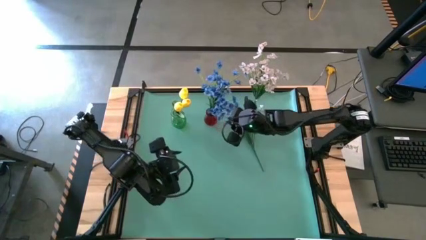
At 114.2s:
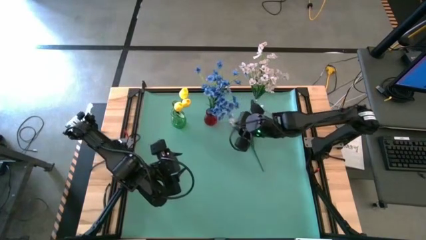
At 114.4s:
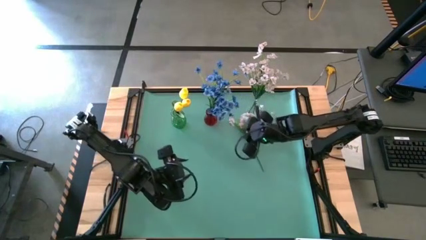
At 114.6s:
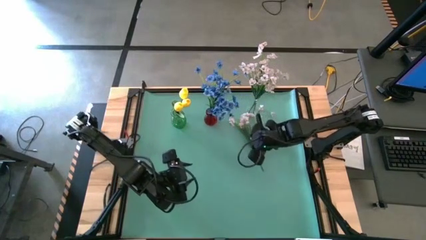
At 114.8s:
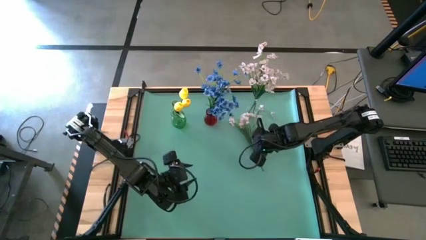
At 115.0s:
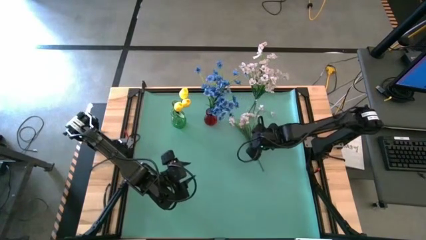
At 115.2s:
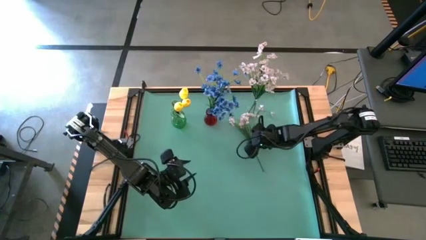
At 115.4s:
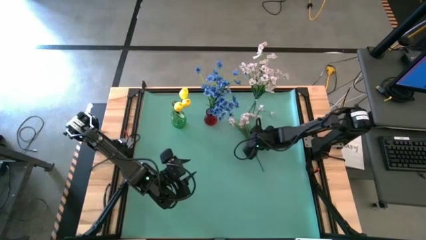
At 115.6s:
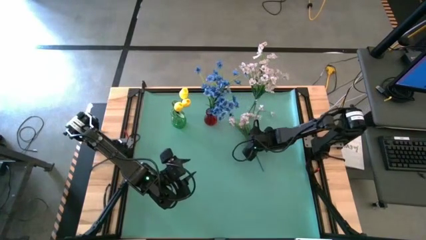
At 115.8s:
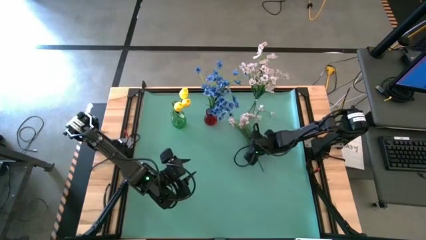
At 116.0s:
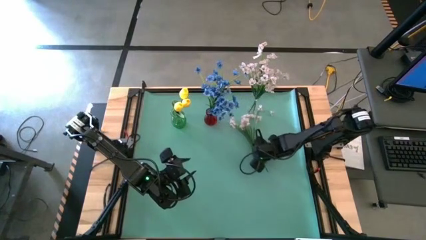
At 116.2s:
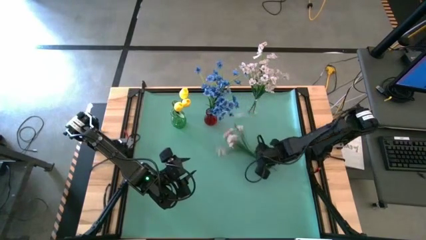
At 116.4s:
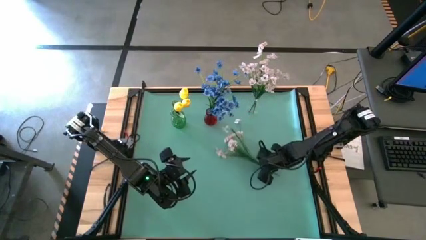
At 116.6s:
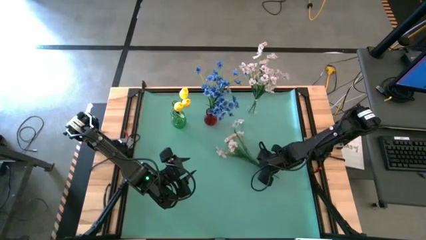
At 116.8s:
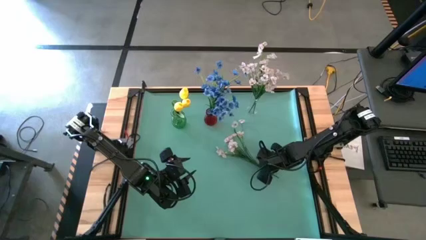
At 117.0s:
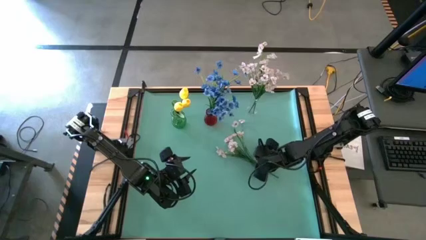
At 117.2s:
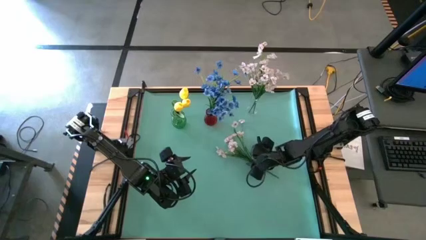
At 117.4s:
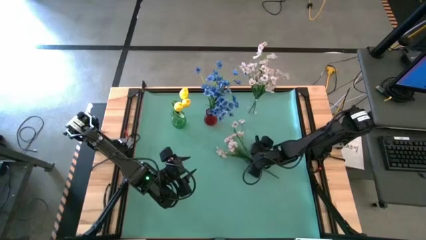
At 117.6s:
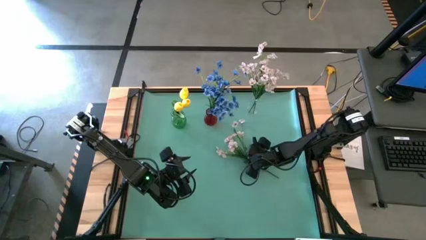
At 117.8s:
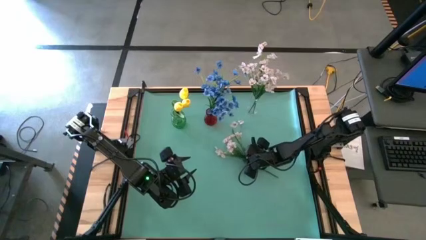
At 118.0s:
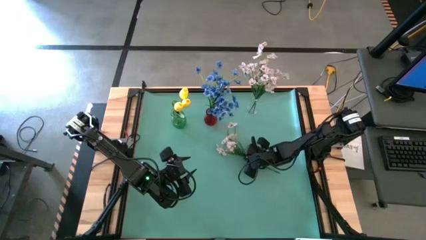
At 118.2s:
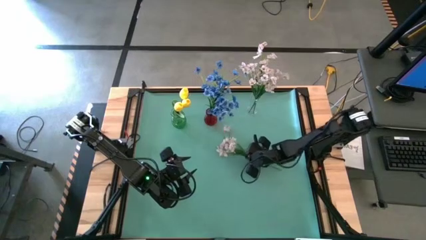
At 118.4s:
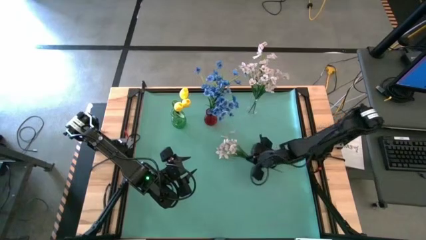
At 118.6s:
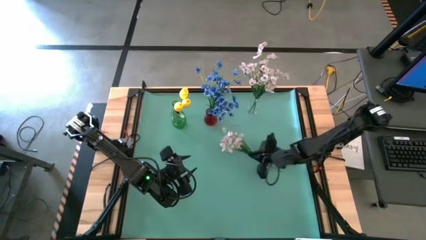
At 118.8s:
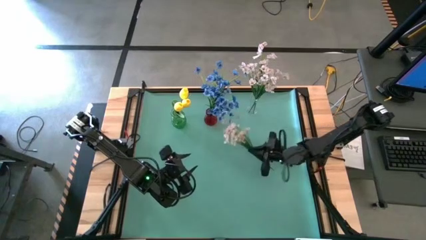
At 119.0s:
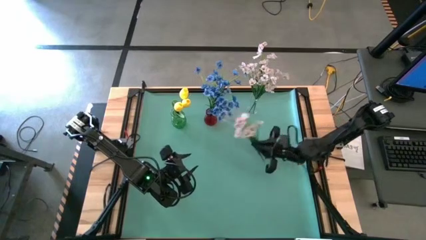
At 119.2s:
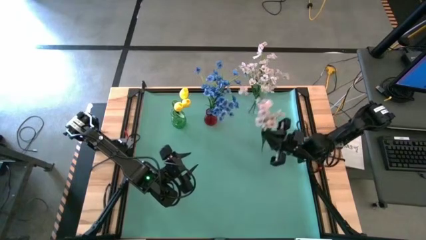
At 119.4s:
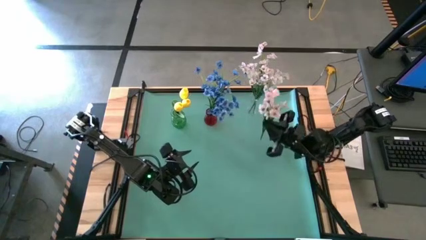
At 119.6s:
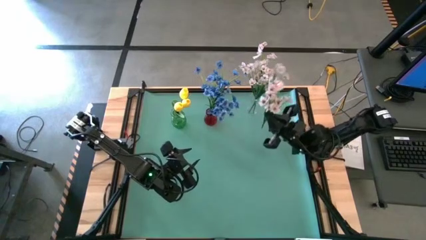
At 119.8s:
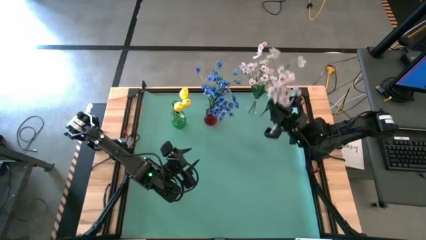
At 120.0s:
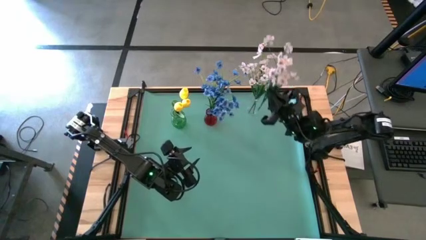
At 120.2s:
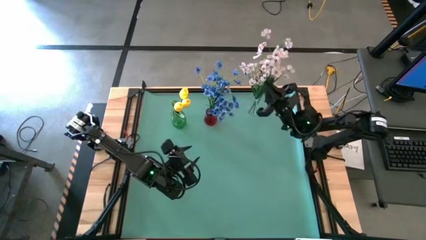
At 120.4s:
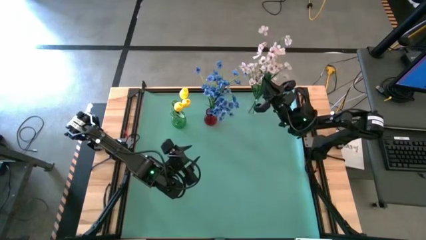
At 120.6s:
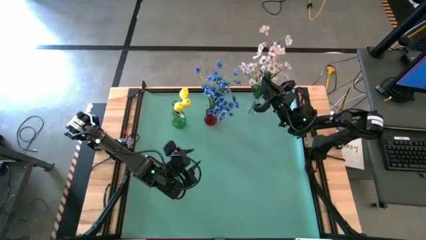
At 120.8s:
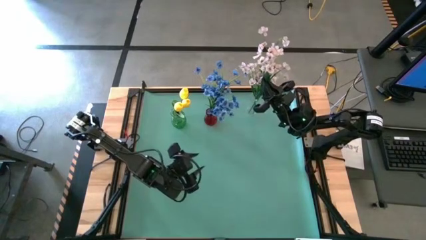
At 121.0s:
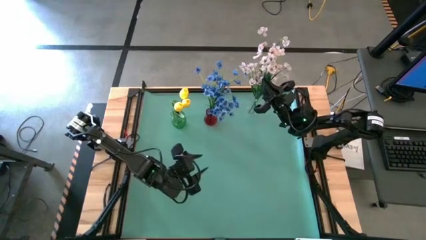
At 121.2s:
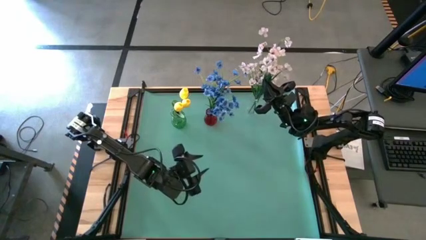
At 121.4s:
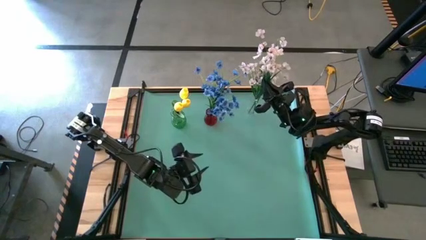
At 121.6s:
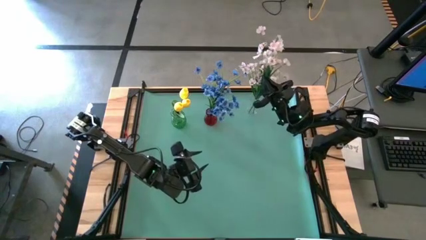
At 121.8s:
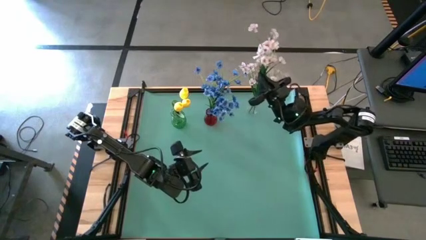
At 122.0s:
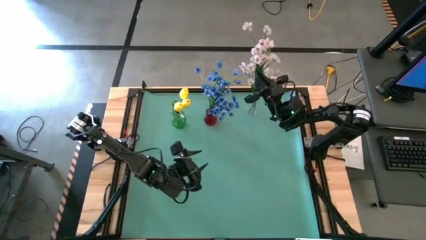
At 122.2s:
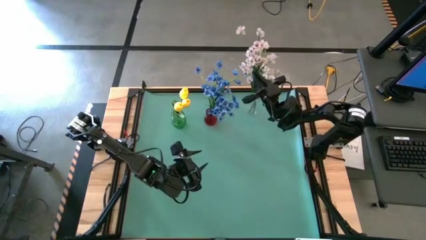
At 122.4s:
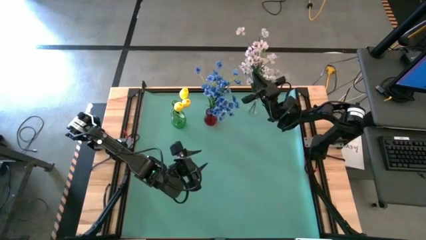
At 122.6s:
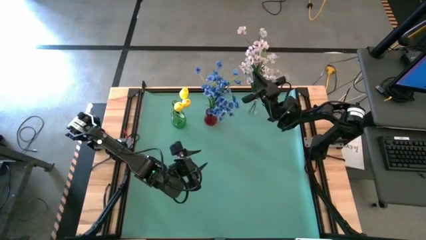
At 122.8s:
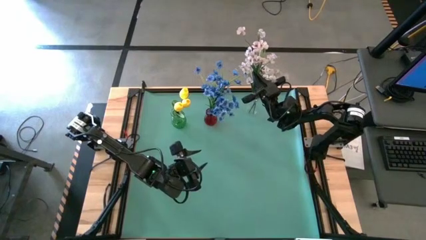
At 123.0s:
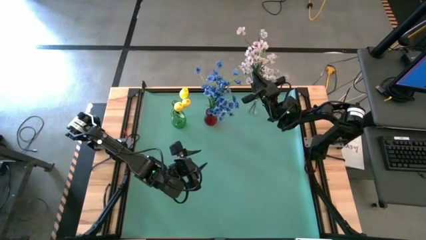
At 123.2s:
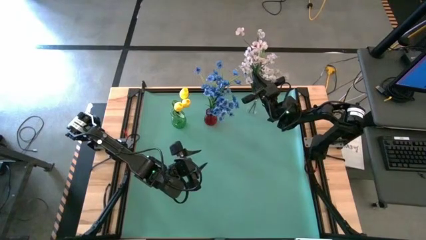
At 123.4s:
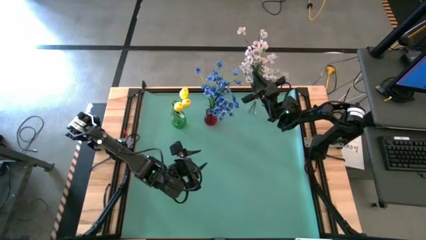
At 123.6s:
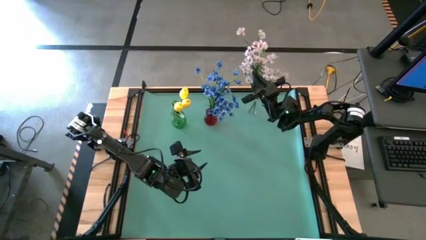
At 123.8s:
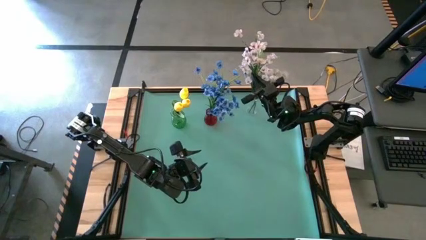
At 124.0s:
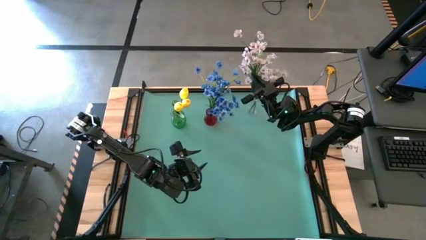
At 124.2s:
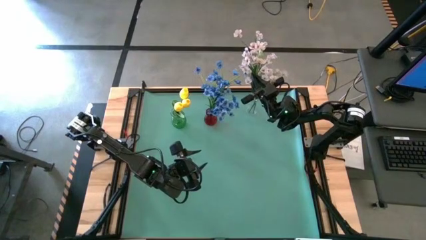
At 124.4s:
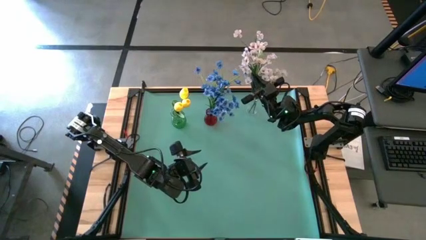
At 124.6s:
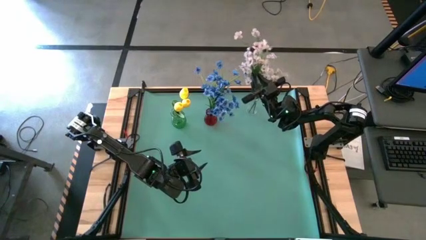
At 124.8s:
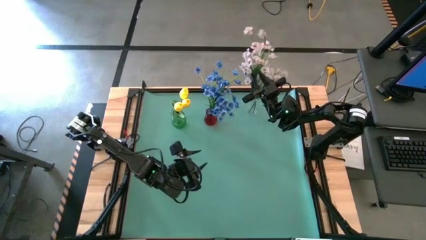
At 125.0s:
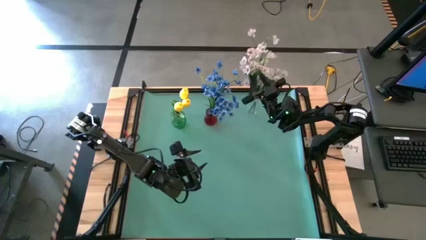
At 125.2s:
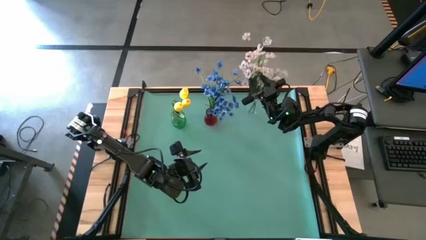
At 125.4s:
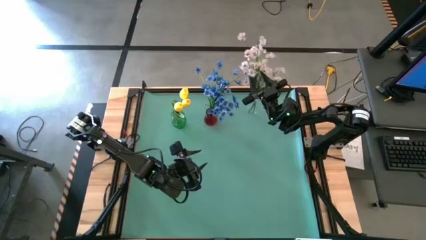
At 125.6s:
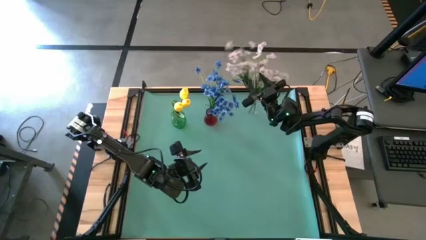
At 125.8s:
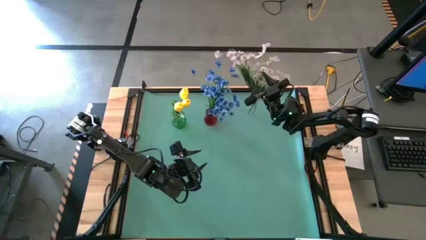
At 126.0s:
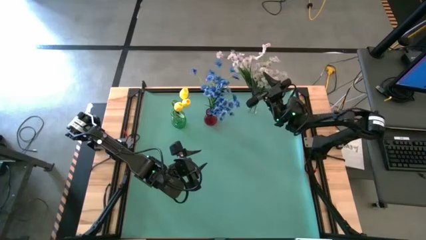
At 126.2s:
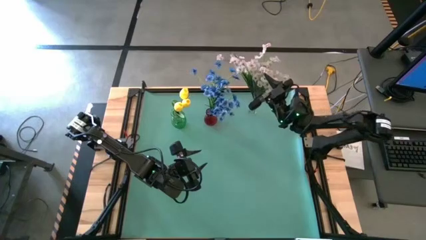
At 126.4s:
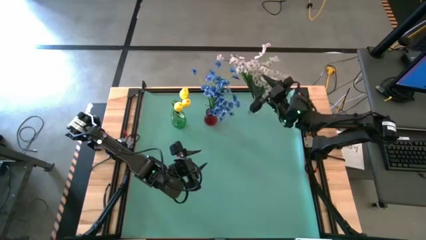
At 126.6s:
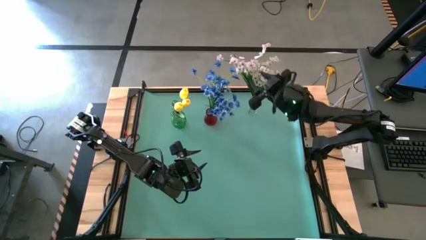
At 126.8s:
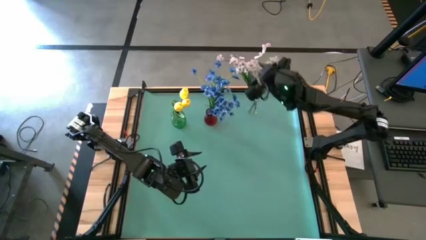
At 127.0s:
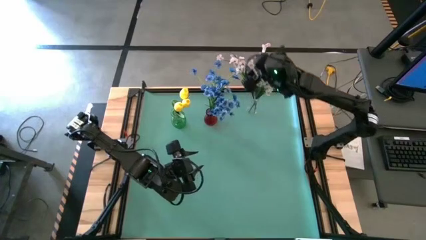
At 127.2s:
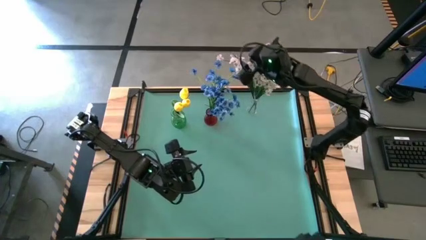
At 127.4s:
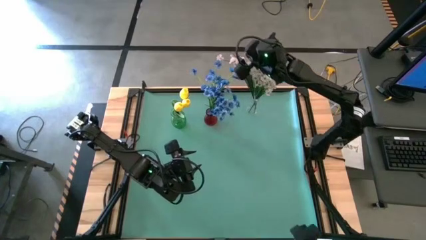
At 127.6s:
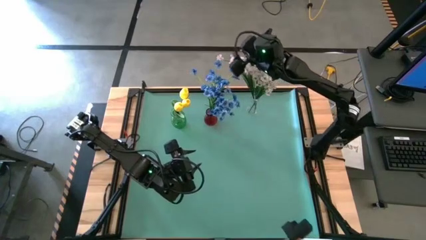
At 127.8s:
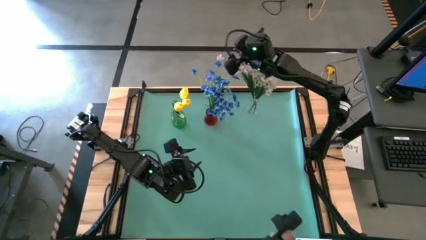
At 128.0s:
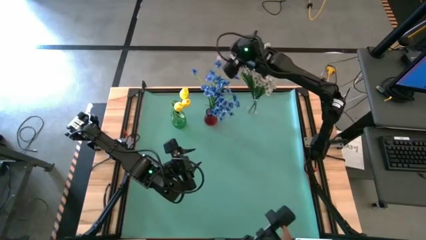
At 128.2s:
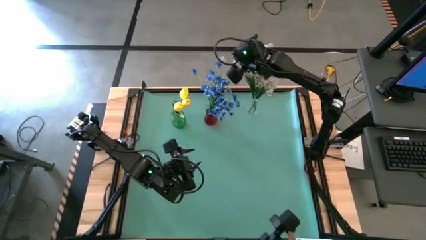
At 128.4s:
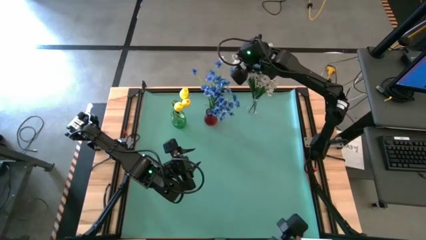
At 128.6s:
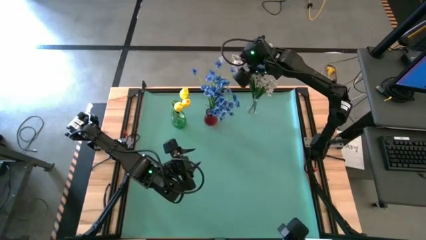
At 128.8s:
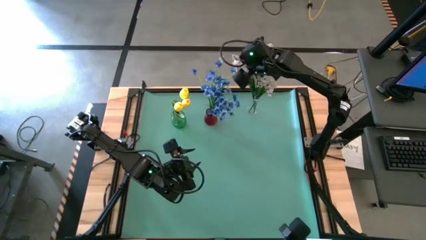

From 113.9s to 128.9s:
Task: Sort flowers into vase by color
Put the white flower into the transparent vase

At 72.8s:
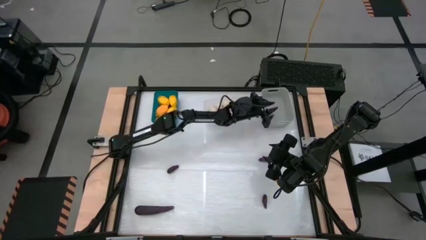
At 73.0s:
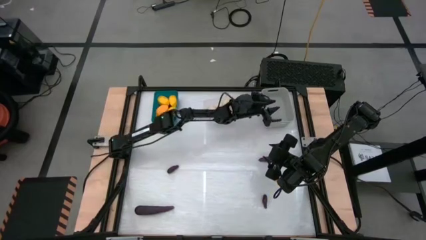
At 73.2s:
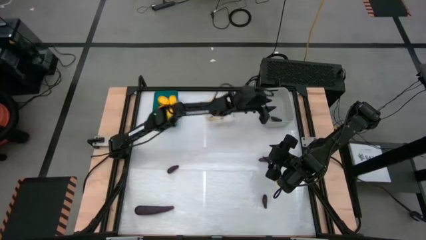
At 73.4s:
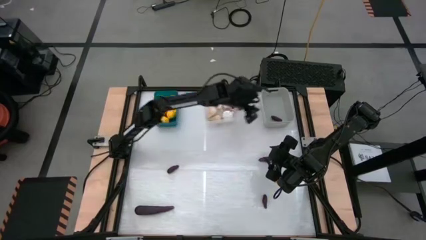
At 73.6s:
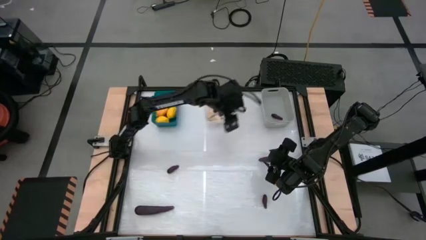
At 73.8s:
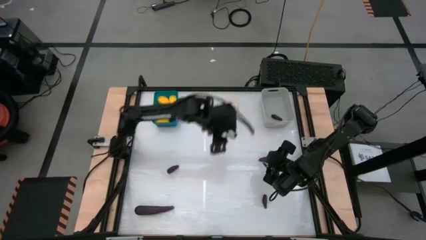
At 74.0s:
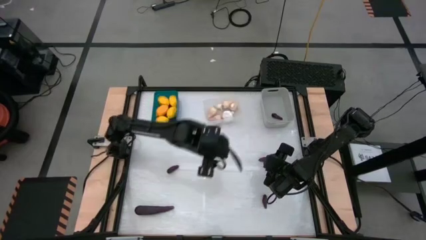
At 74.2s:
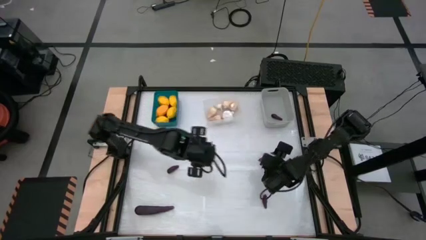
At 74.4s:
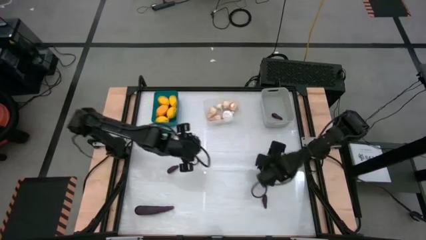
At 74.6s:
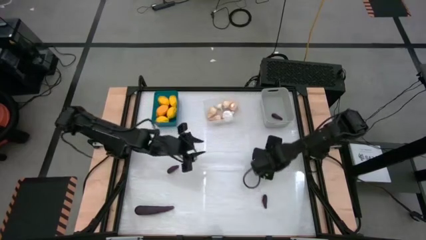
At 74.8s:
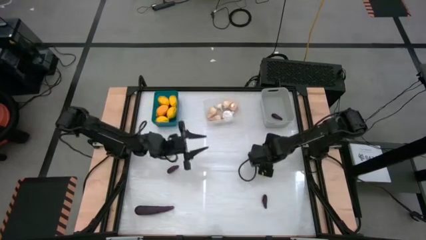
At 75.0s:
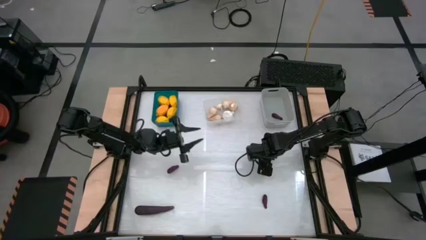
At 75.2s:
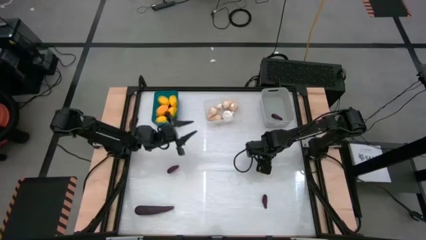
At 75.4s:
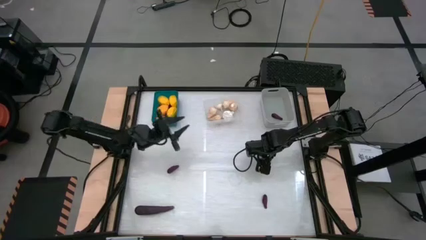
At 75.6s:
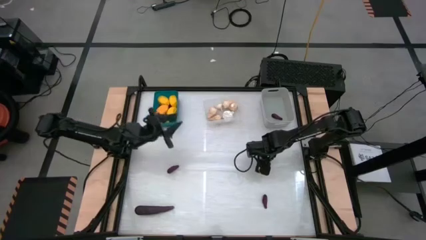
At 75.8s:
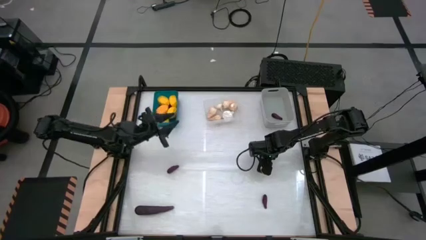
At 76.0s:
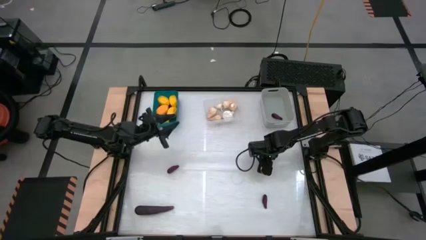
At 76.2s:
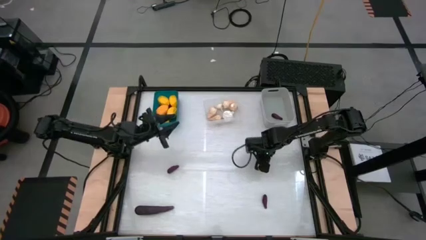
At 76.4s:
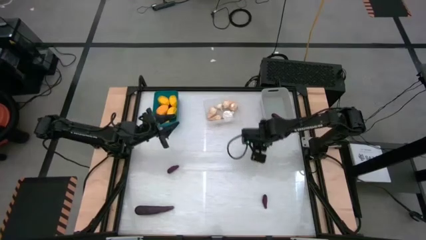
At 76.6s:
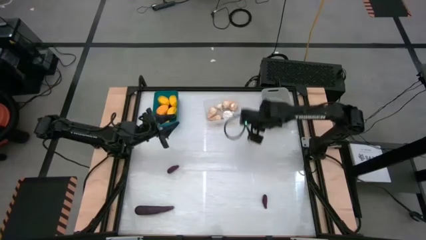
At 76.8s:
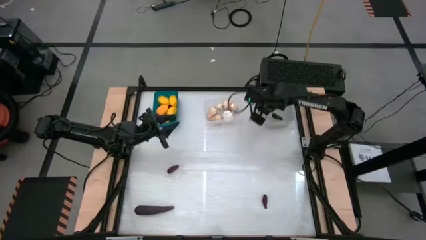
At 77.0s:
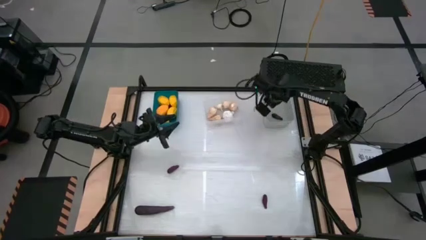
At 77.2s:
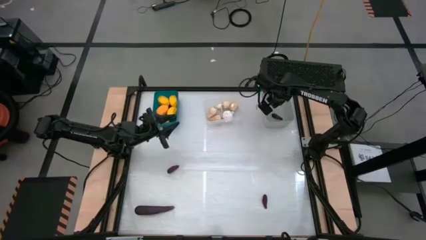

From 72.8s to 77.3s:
Task: Sort produce into baskets
Put the eggplant into the gray bin
